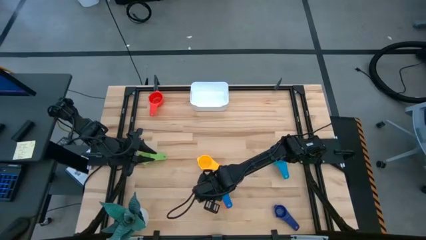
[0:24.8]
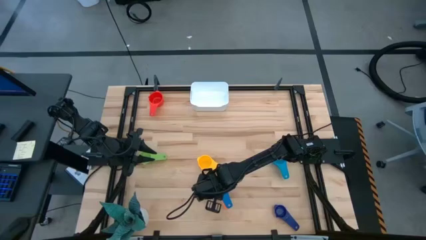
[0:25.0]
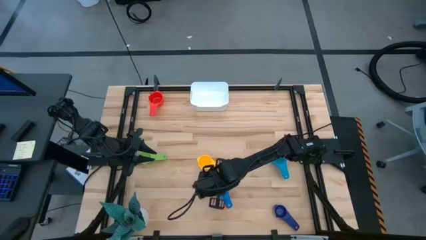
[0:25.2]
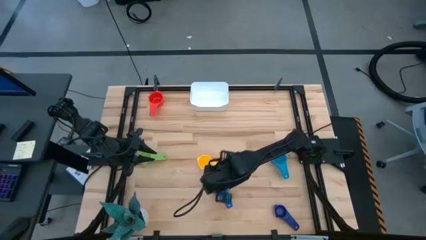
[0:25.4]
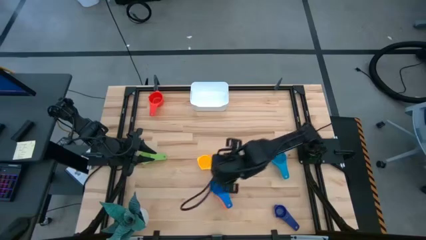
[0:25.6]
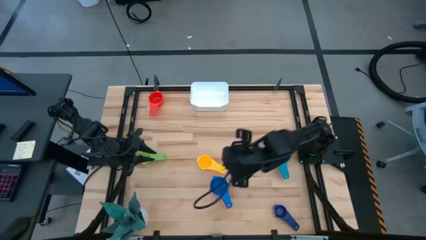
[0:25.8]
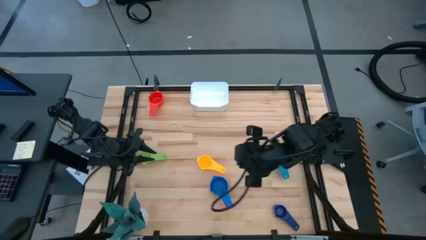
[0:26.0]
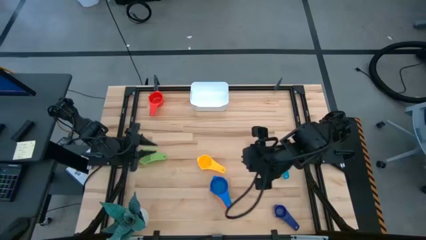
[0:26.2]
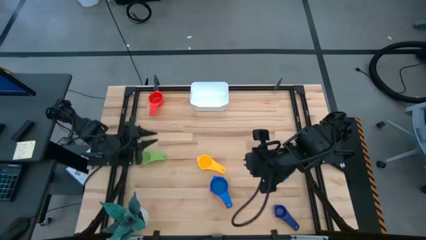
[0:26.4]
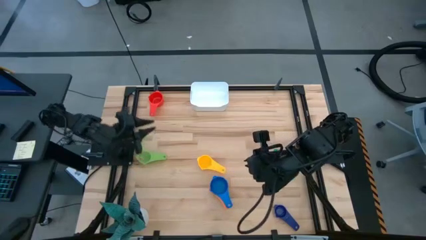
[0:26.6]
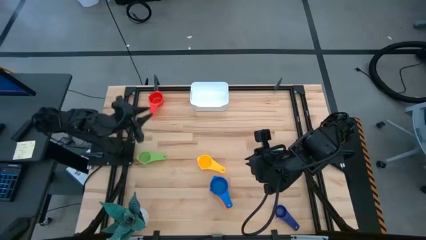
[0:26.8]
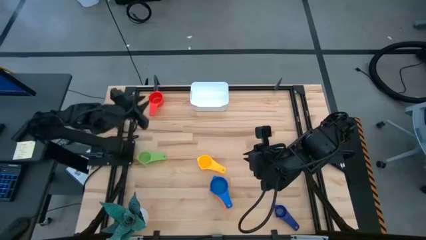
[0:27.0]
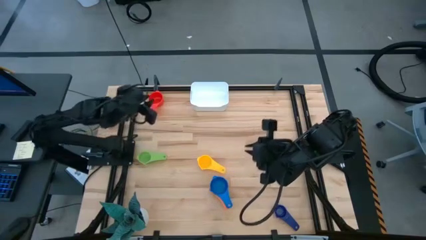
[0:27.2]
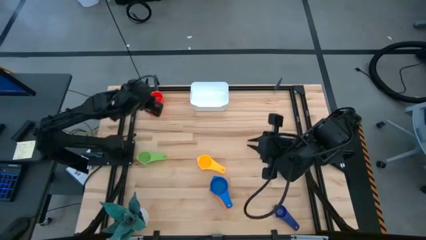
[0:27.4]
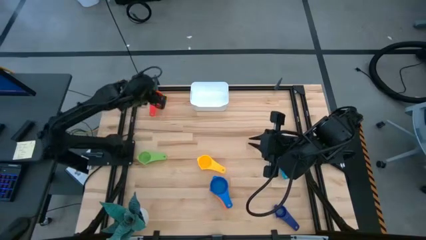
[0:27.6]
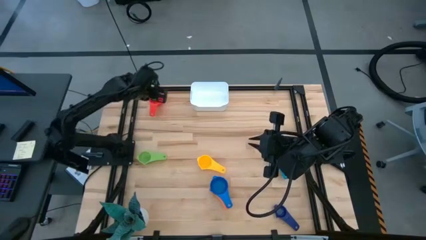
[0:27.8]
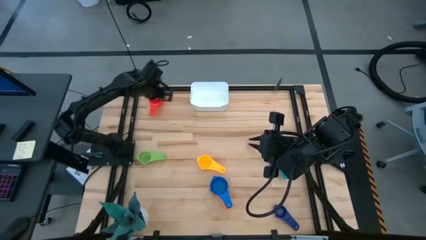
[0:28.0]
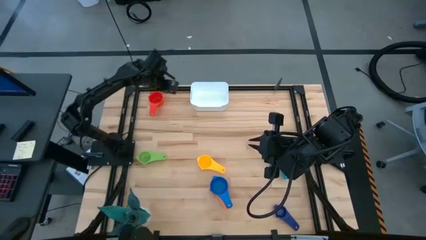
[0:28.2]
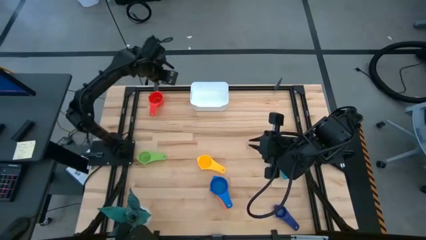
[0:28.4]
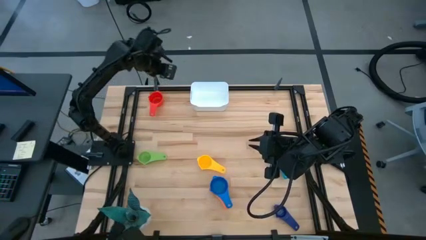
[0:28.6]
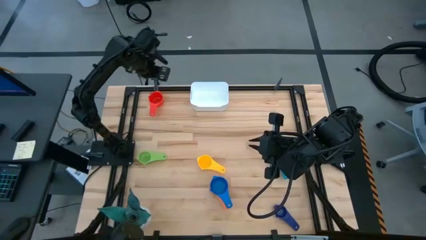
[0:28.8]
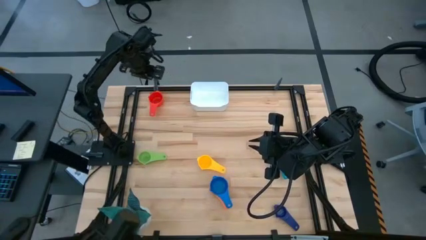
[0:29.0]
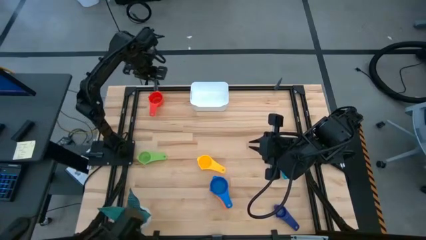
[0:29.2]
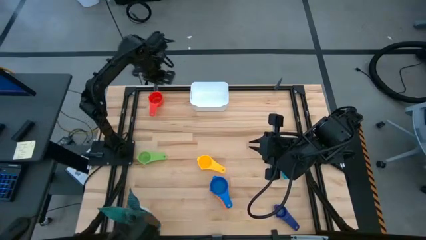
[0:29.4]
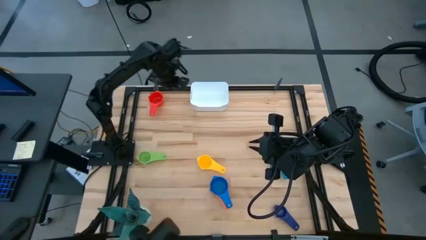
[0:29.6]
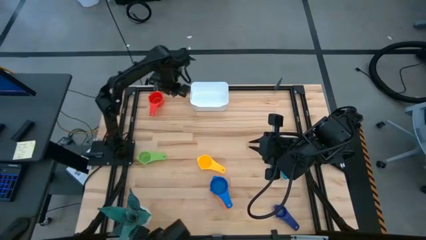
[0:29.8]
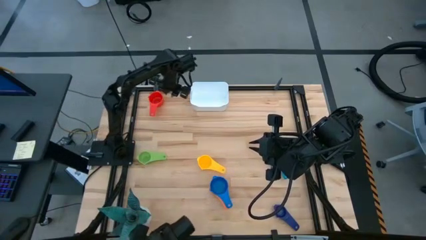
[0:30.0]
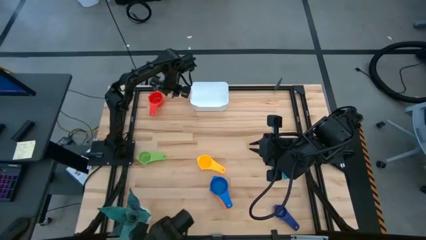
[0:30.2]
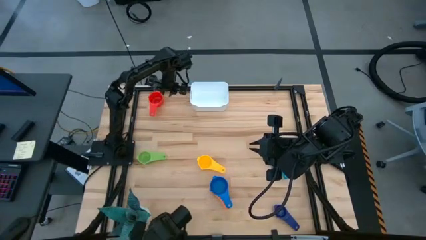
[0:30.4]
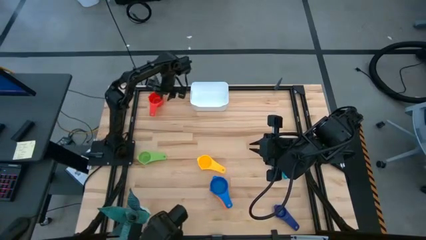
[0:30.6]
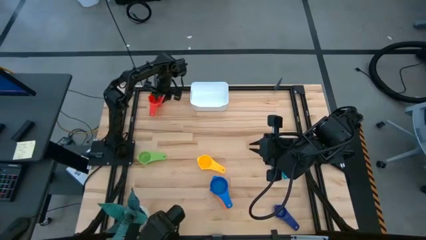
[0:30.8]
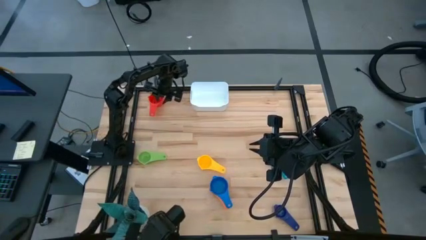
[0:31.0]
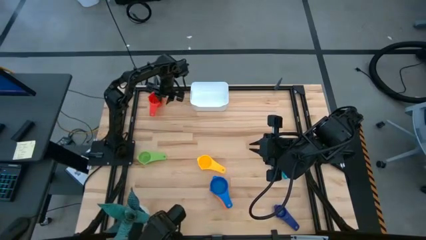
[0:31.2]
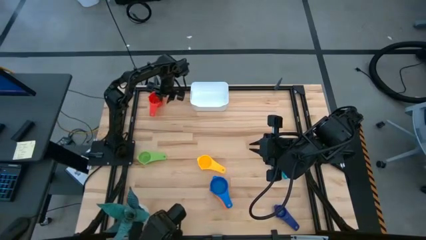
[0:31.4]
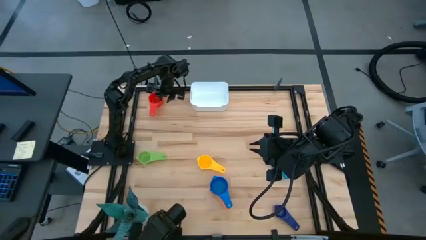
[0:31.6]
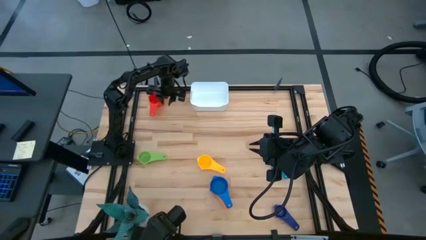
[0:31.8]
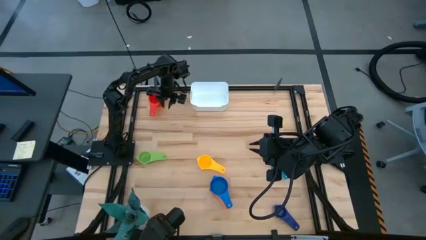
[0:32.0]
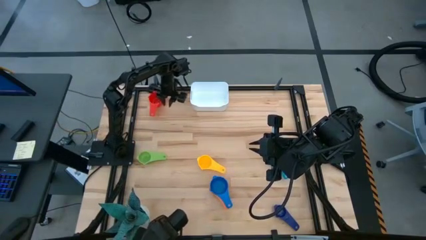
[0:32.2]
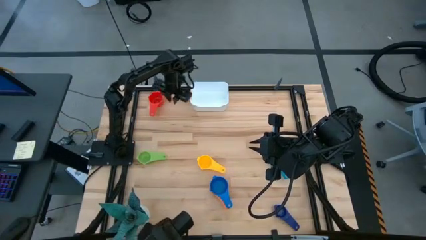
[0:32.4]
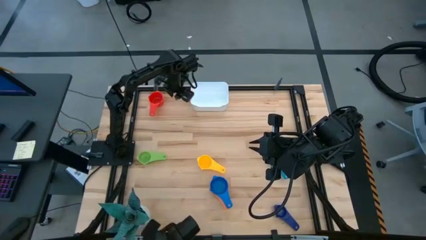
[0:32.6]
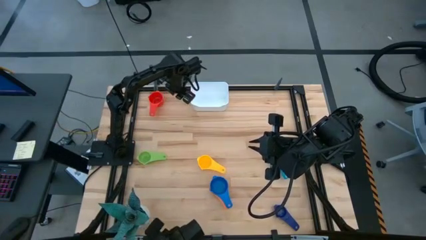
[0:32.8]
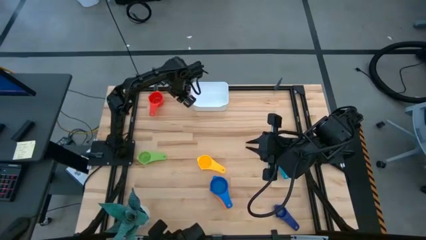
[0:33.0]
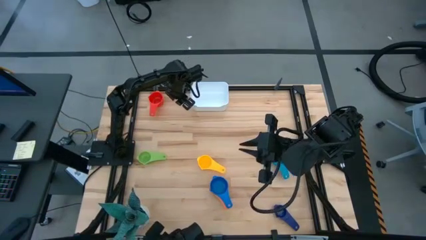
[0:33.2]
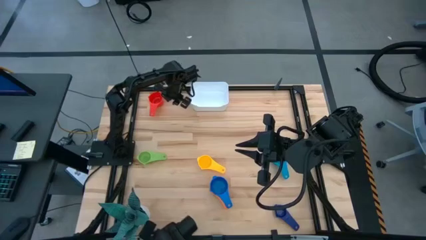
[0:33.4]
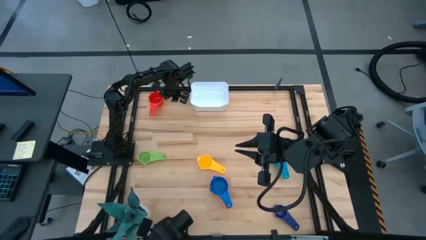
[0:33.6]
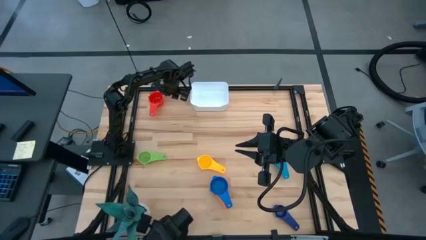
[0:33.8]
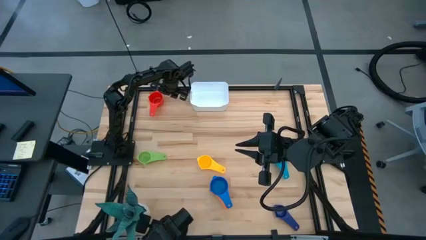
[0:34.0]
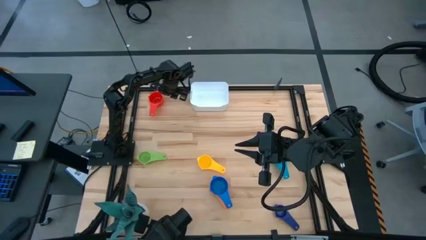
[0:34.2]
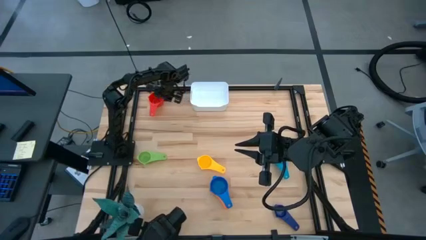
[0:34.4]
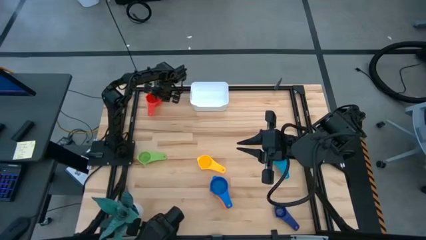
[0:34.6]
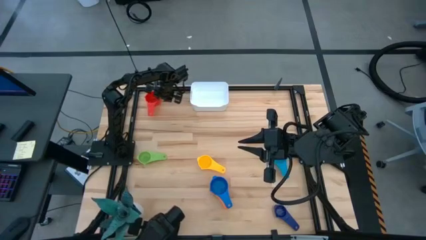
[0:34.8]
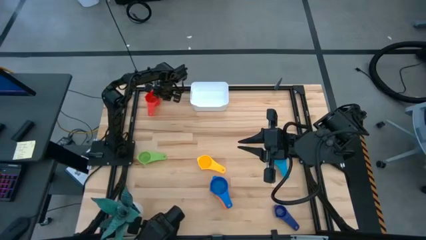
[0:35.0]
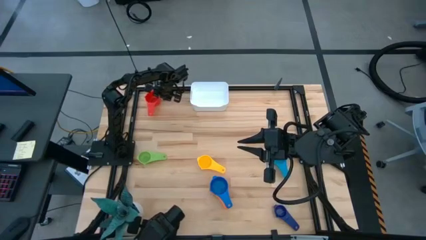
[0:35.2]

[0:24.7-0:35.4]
Task: Nest measuring cups in basket
Stack the red measuring cup on top of the blue measuring cup
